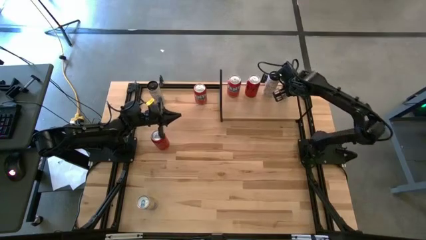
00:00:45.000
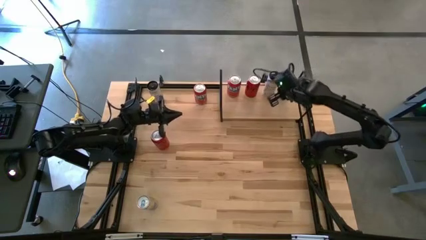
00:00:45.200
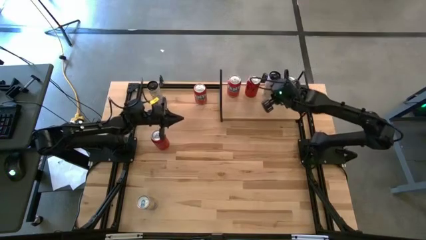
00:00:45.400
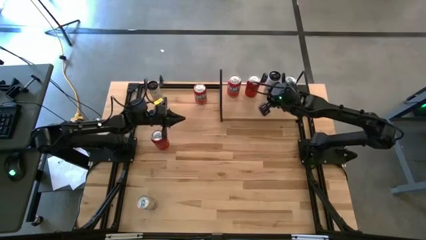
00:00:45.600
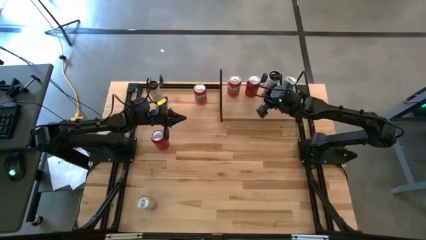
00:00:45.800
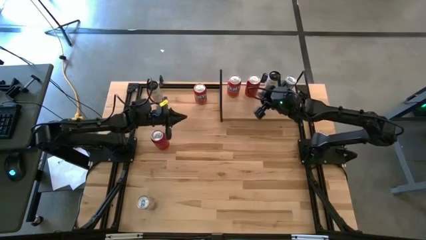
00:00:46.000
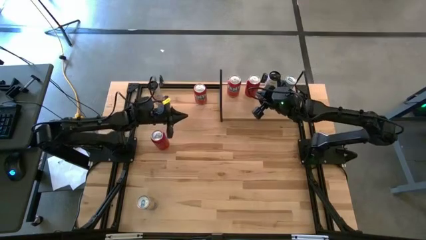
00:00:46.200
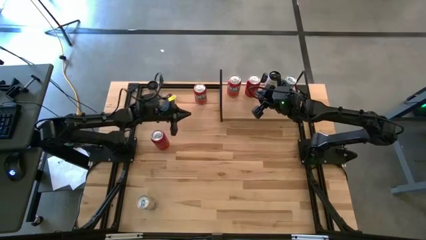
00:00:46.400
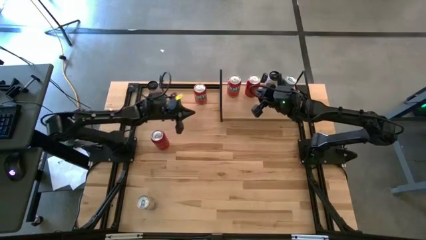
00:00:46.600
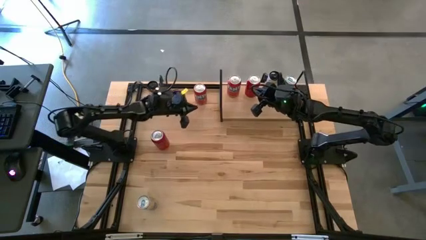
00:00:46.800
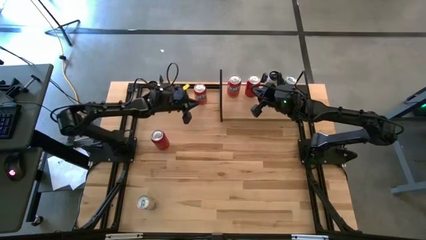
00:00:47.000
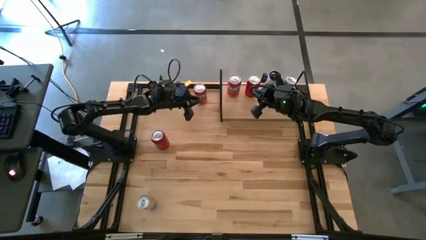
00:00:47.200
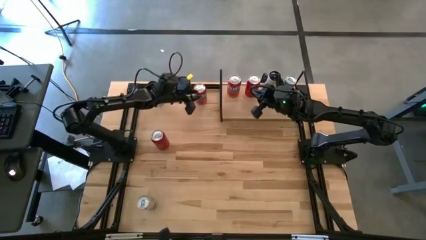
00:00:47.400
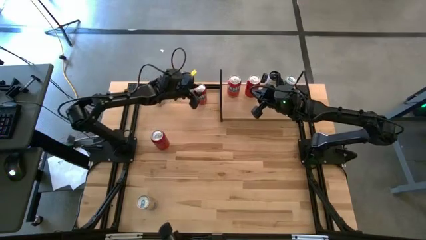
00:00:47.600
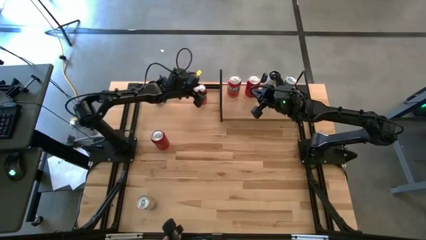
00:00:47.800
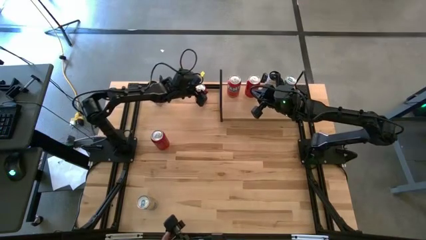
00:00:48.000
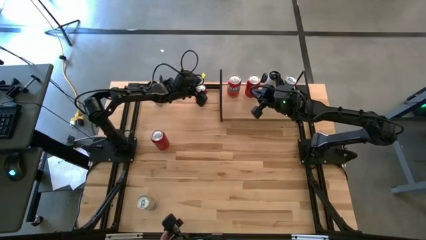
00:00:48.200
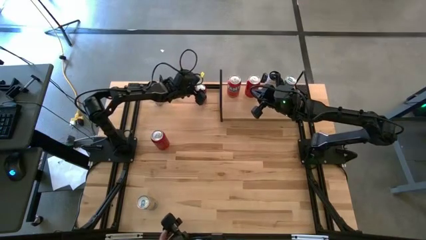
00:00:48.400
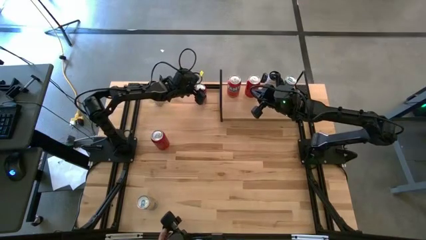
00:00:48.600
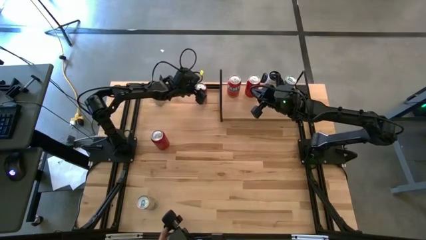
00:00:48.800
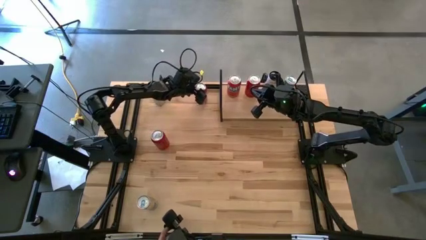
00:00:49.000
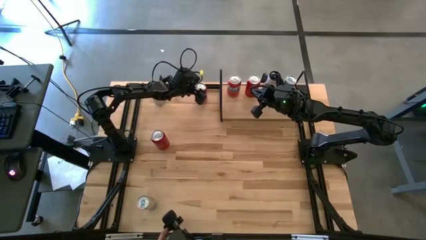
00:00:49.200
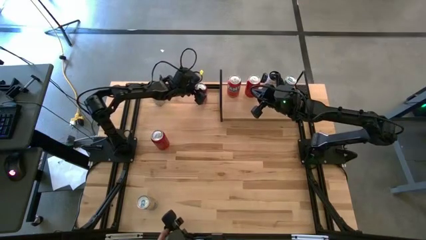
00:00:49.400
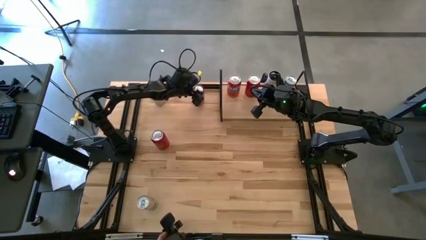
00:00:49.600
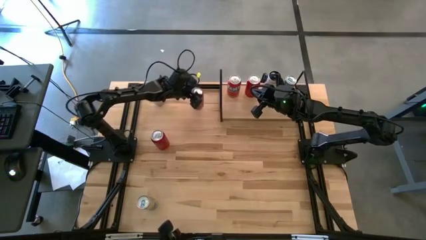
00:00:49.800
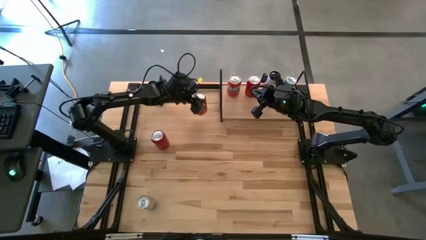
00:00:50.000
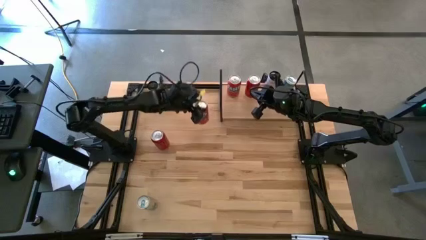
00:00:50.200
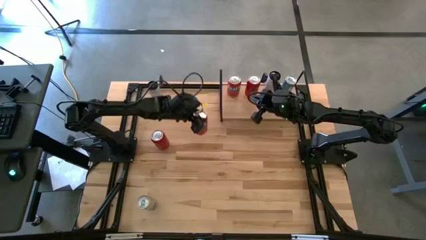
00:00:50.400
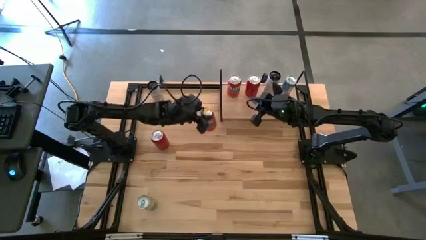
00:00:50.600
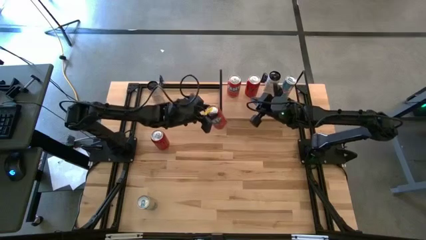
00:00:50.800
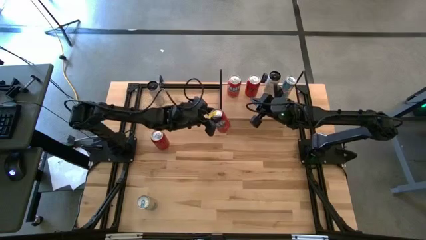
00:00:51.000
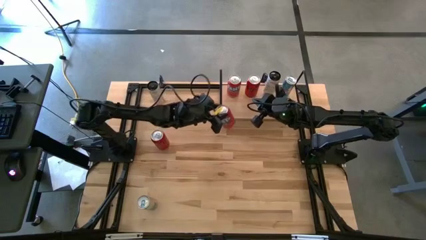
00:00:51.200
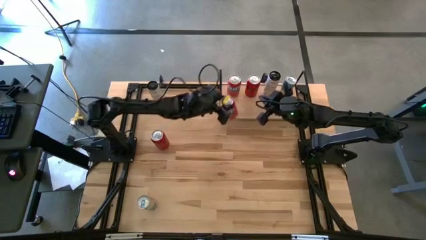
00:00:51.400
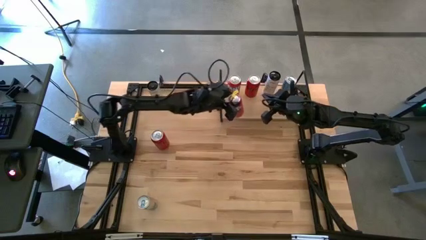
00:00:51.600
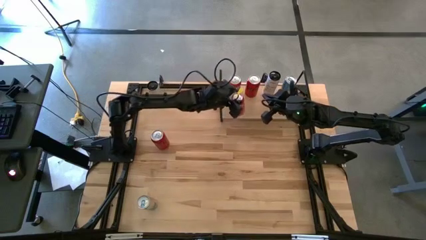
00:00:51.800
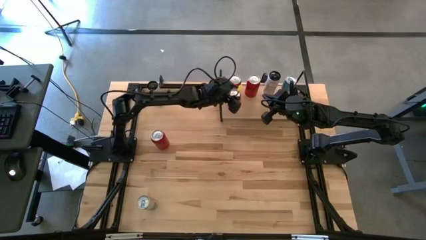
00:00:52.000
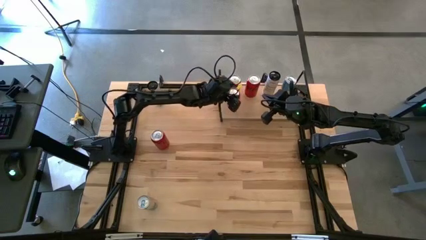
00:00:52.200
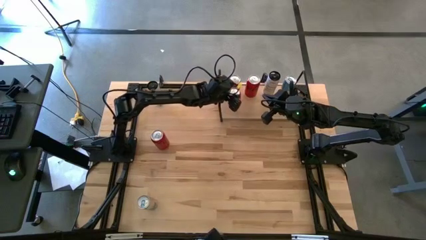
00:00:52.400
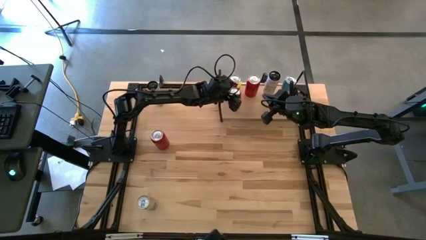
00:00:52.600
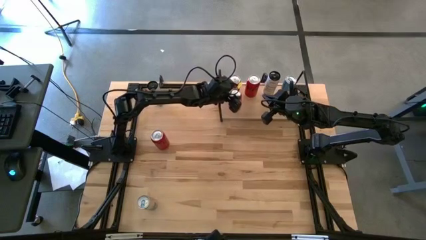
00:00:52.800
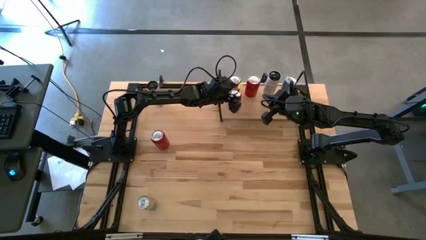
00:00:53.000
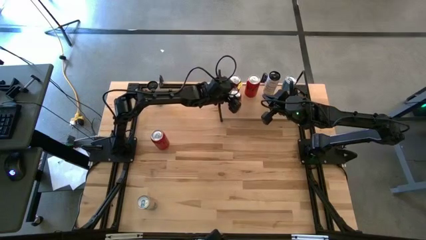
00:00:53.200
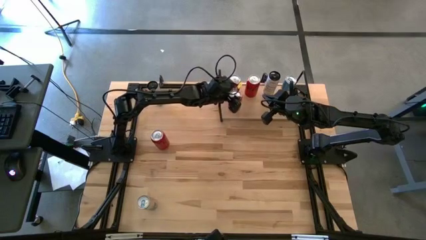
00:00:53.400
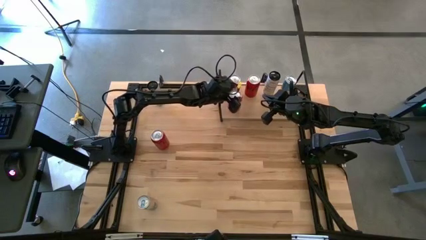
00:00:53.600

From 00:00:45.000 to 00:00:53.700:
Task: Place canned beverage on shelf
Put the orange soda can on the shelf aligned with the orange soda can

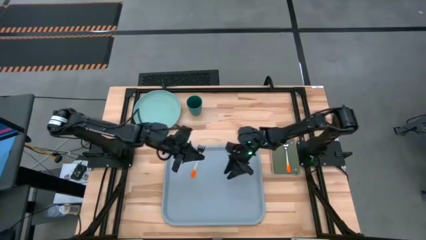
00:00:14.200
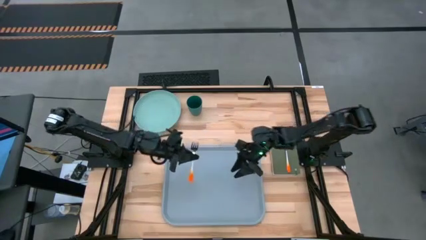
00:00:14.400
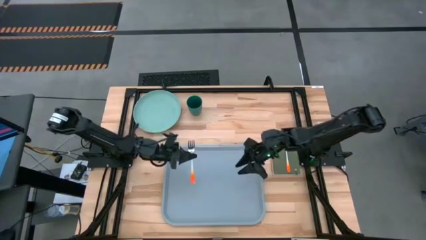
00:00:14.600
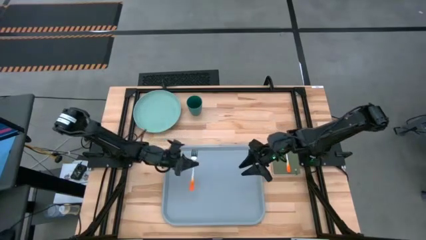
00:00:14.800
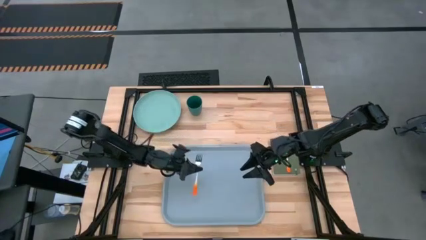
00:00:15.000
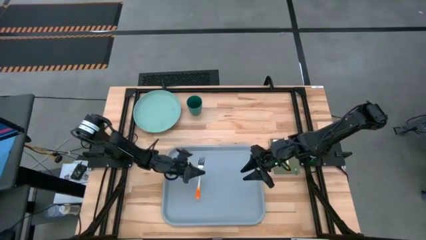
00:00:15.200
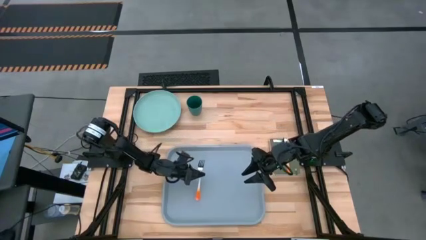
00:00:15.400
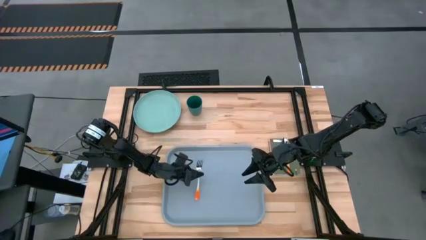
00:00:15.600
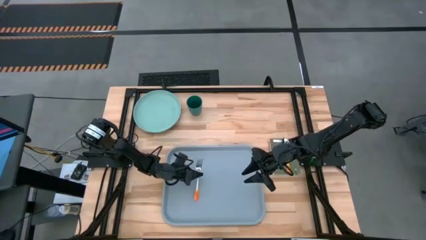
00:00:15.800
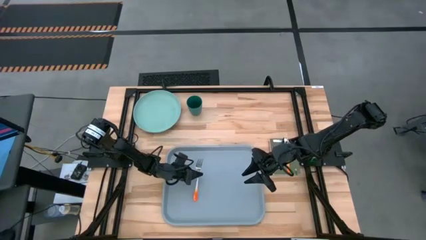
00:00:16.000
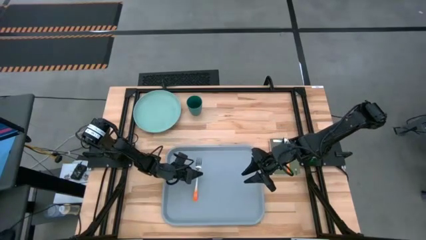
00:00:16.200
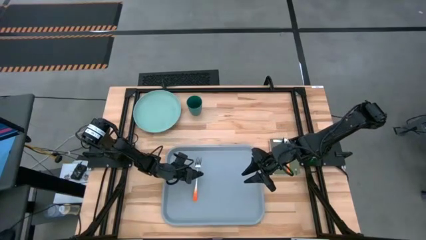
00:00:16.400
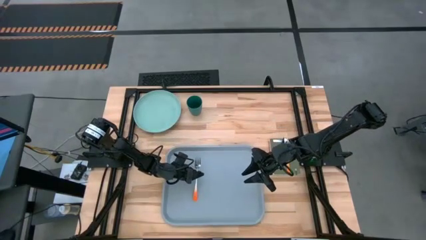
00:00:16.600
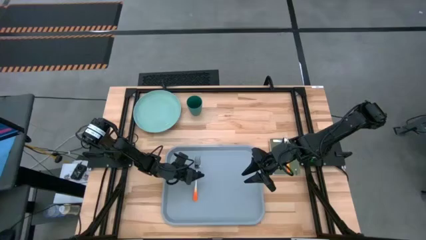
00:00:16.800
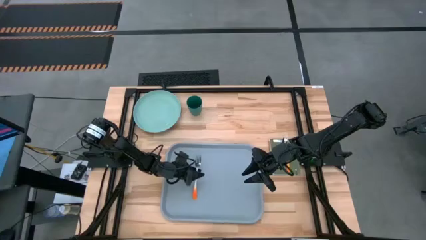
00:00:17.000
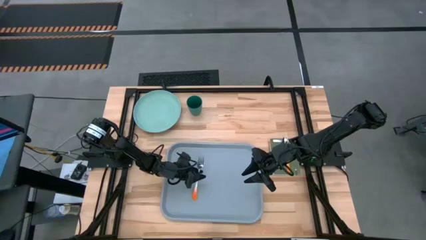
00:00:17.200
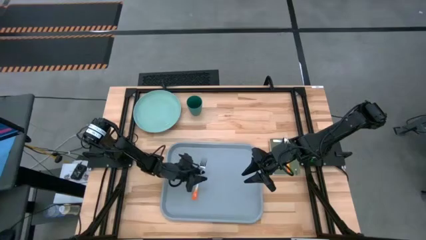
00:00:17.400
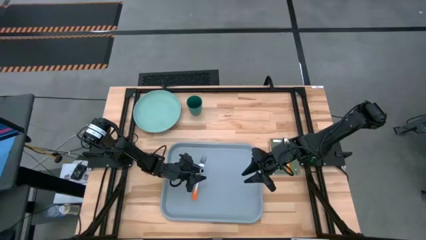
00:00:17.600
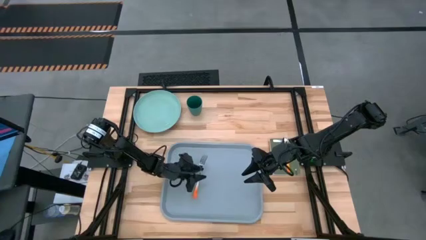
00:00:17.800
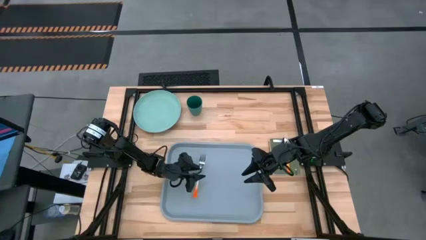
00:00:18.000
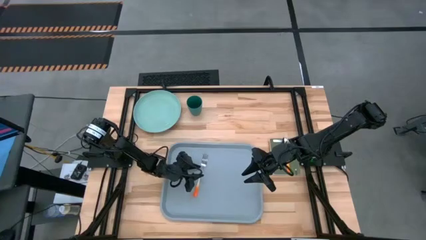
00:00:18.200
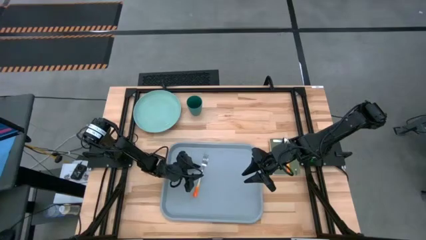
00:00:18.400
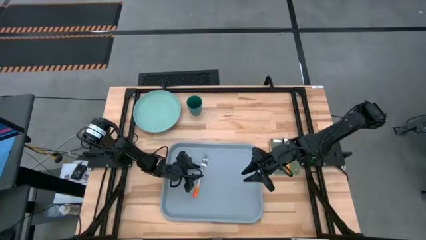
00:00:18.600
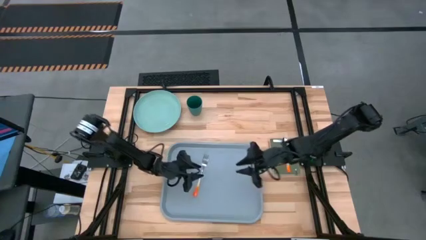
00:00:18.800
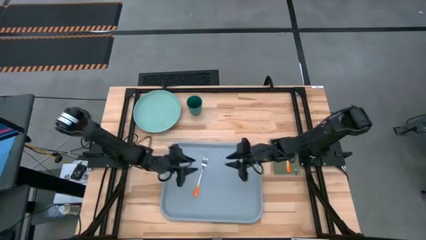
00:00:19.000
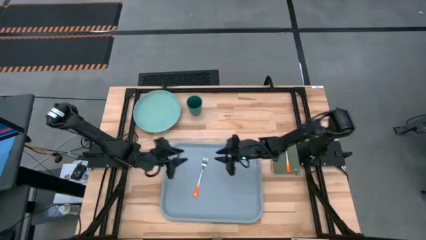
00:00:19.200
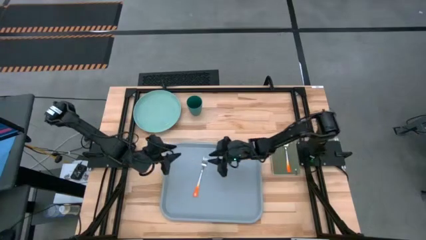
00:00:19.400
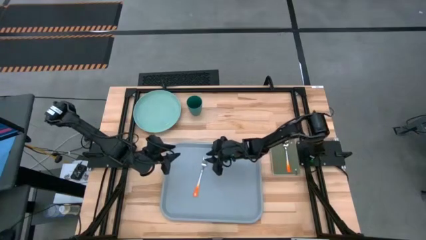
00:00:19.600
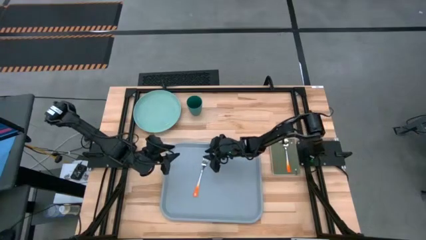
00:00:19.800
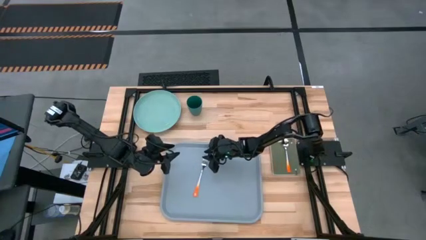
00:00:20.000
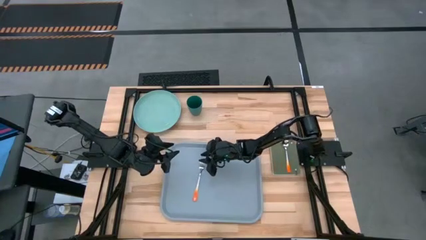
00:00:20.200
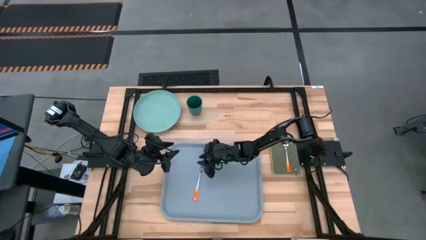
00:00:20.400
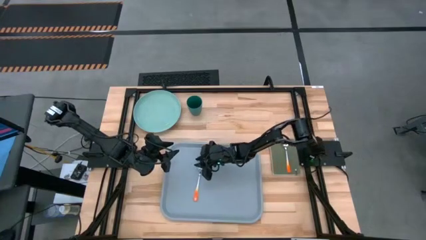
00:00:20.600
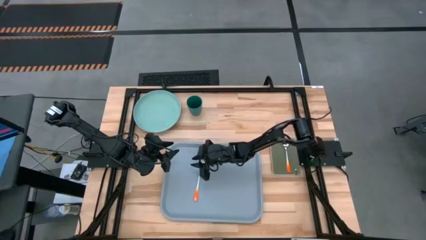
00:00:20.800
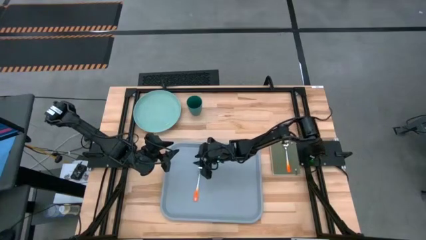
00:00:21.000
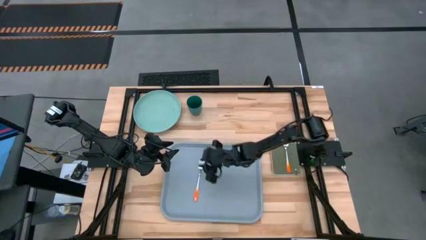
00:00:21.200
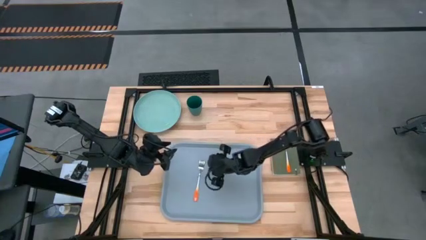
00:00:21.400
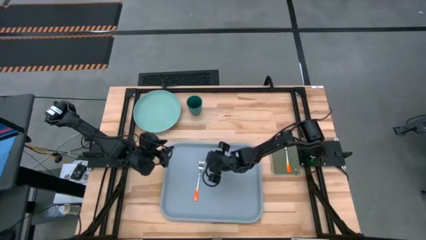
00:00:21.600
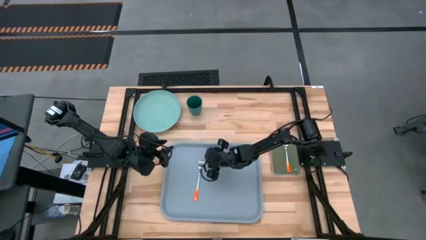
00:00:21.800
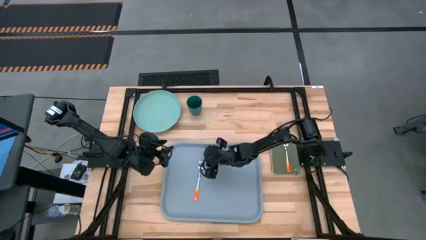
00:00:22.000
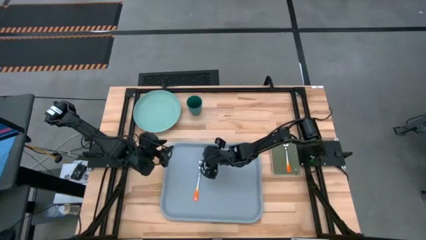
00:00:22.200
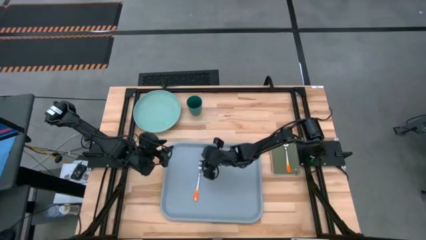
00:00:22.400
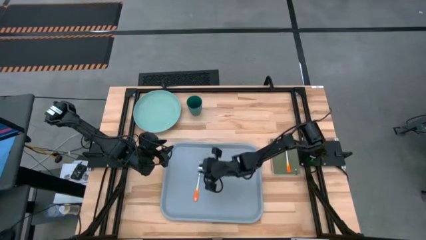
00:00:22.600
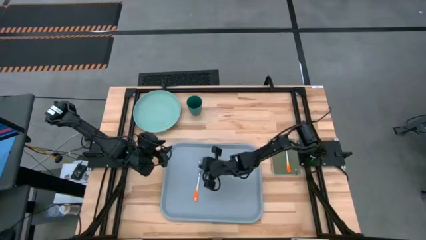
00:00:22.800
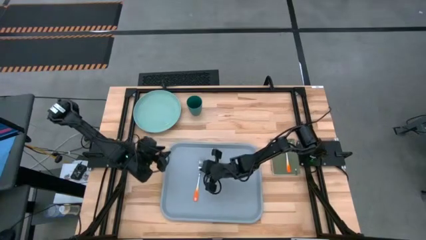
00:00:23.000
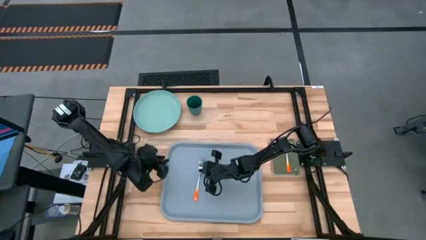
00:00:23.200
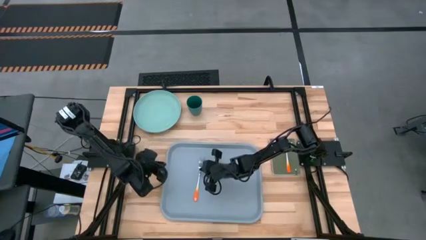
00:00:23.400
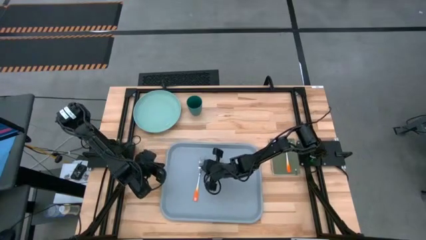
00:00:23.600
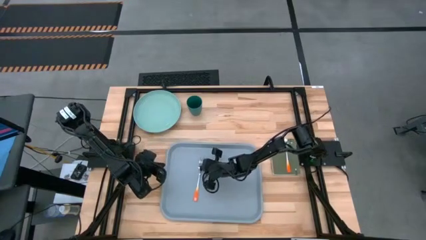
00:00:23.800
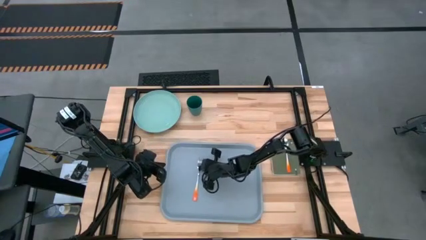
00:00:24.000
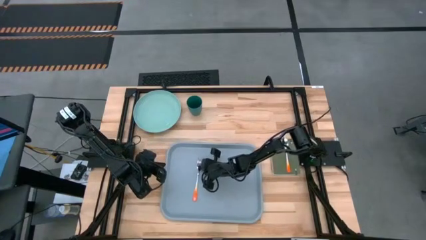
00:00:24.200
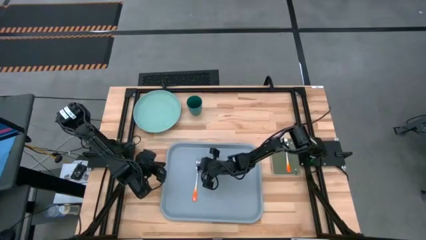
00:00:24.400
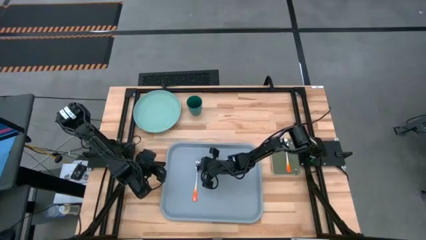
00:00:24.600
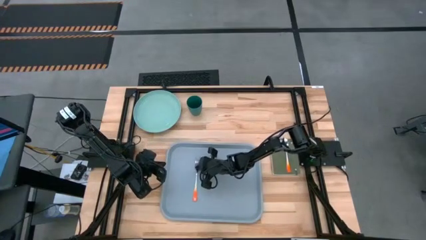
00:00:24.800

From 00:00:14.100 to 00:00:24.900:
Task: Pick and place plate/cup/fork/spoon on tray
Put the orange fork on the blue serving tray
